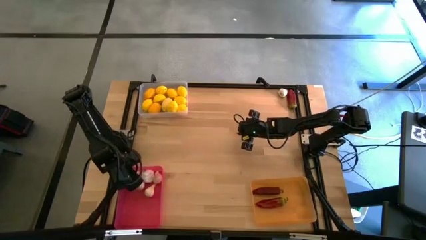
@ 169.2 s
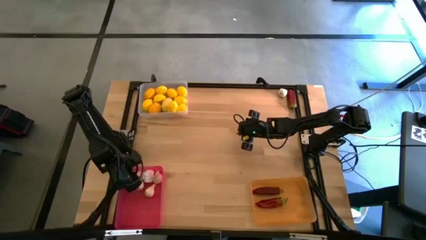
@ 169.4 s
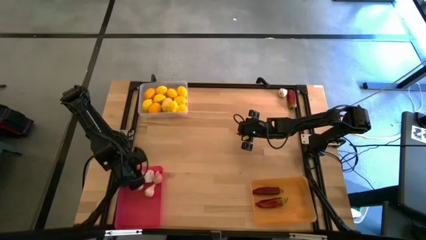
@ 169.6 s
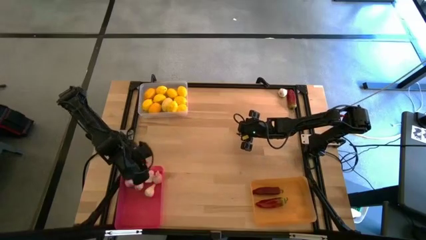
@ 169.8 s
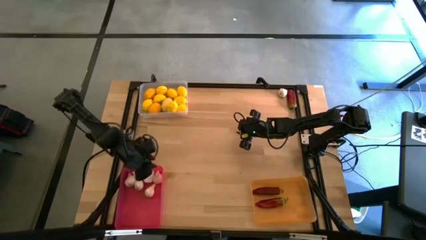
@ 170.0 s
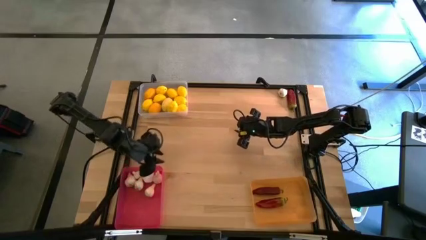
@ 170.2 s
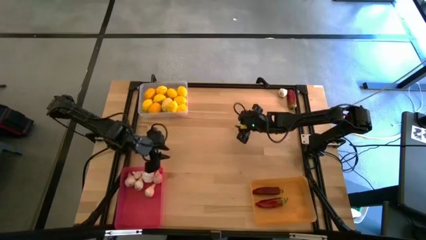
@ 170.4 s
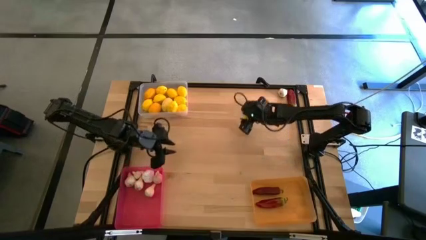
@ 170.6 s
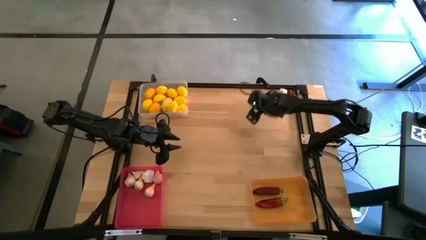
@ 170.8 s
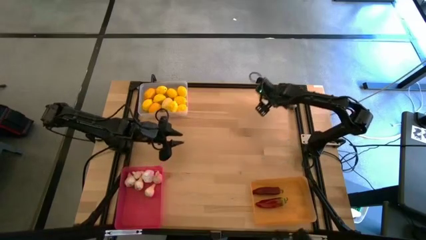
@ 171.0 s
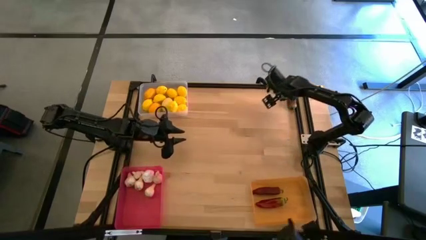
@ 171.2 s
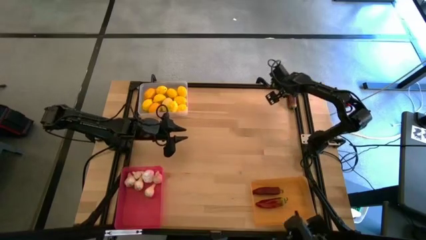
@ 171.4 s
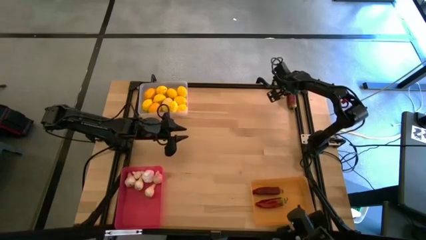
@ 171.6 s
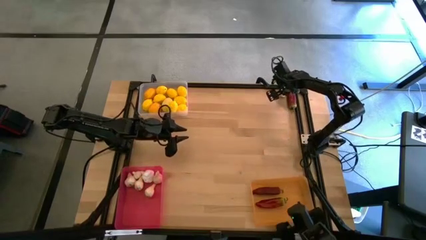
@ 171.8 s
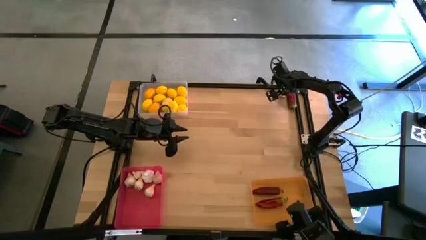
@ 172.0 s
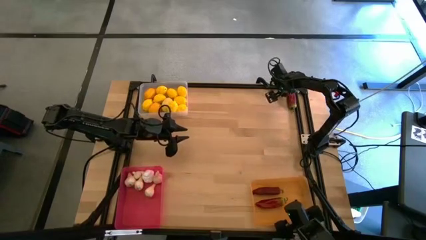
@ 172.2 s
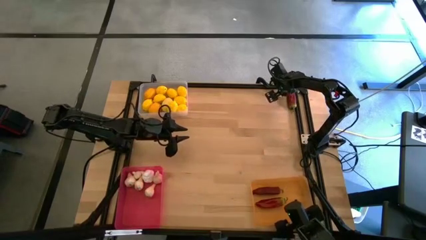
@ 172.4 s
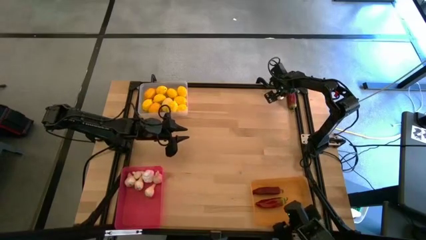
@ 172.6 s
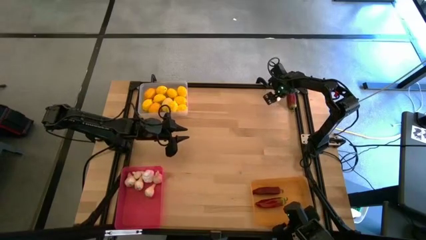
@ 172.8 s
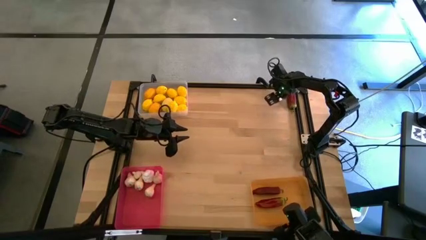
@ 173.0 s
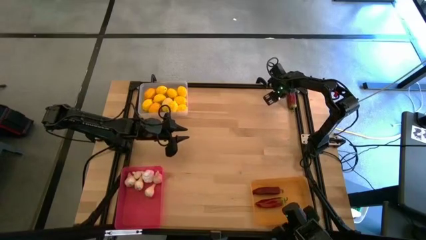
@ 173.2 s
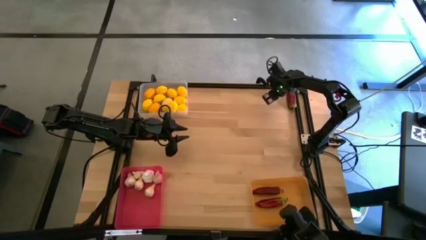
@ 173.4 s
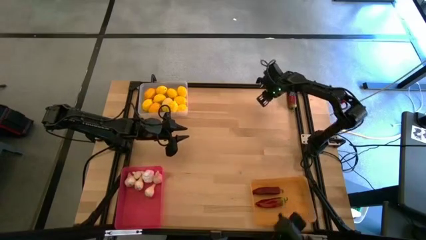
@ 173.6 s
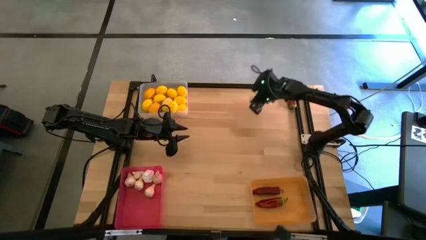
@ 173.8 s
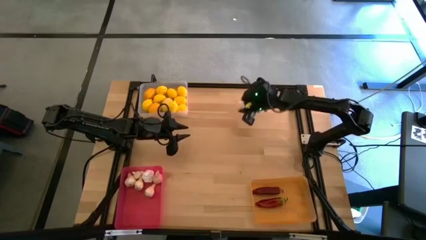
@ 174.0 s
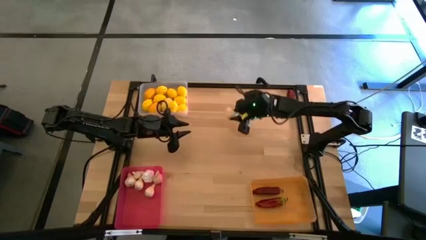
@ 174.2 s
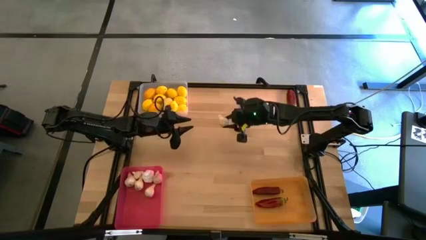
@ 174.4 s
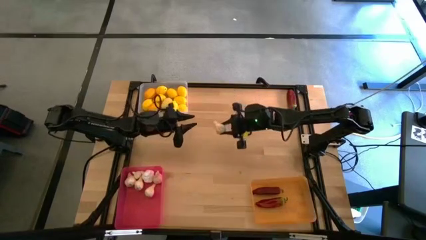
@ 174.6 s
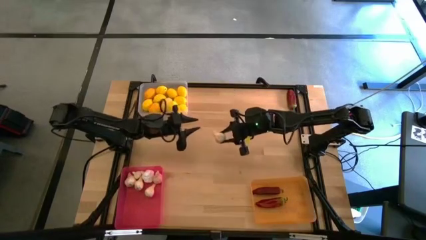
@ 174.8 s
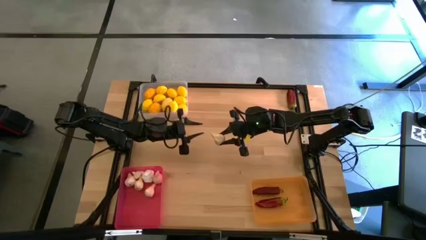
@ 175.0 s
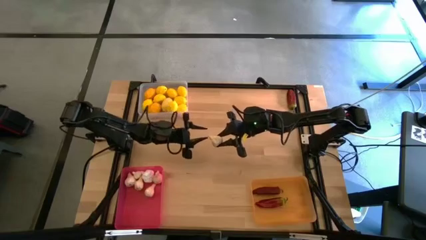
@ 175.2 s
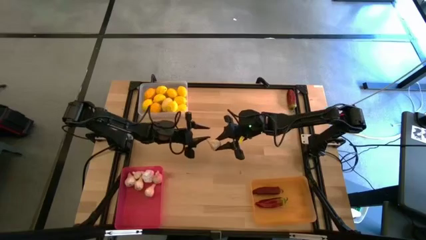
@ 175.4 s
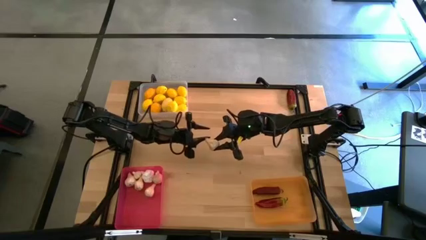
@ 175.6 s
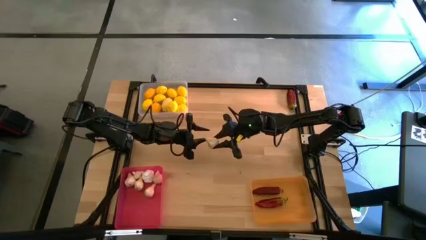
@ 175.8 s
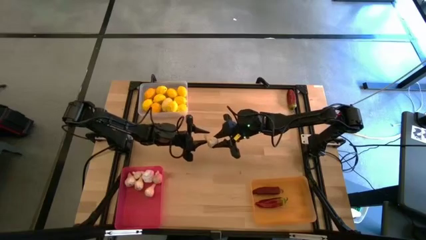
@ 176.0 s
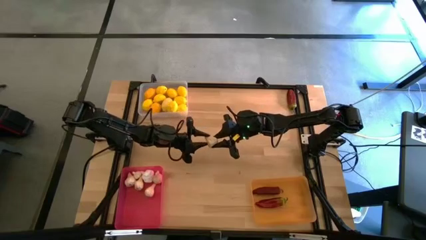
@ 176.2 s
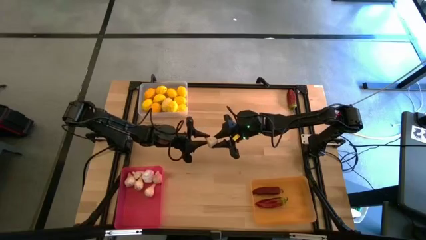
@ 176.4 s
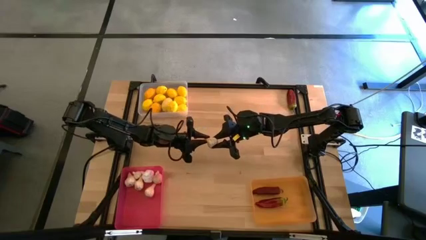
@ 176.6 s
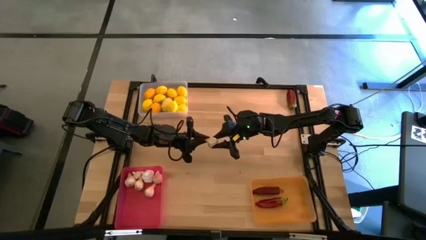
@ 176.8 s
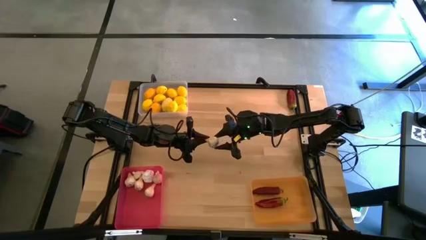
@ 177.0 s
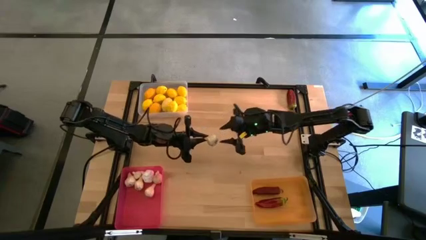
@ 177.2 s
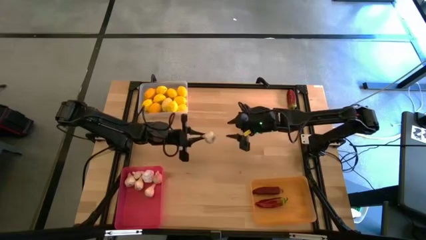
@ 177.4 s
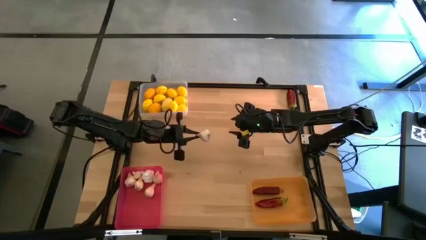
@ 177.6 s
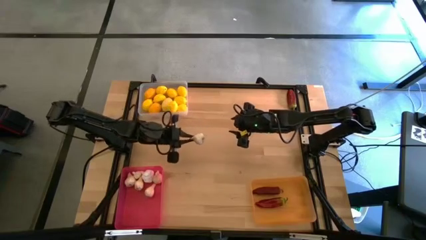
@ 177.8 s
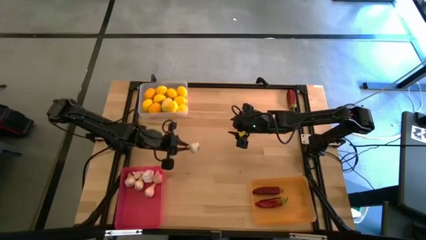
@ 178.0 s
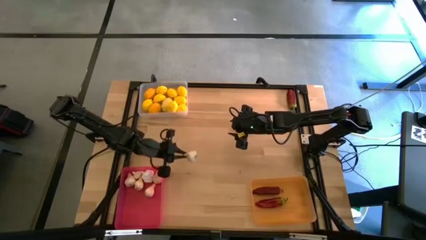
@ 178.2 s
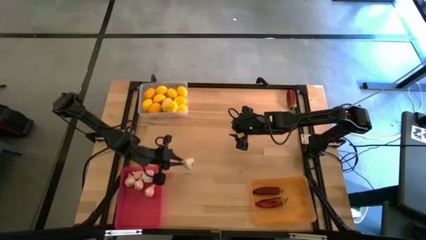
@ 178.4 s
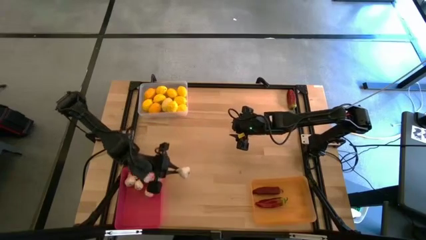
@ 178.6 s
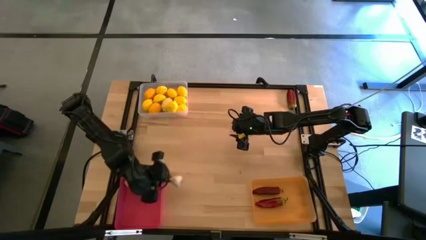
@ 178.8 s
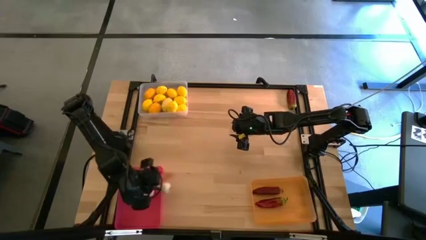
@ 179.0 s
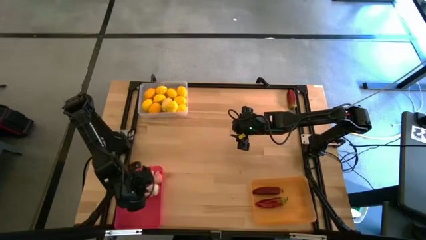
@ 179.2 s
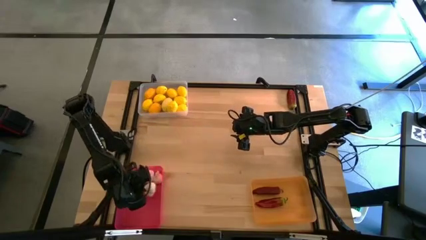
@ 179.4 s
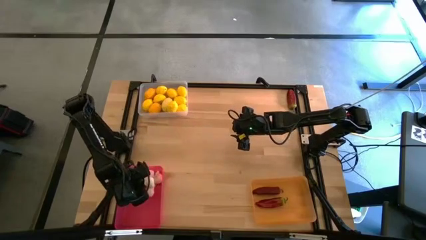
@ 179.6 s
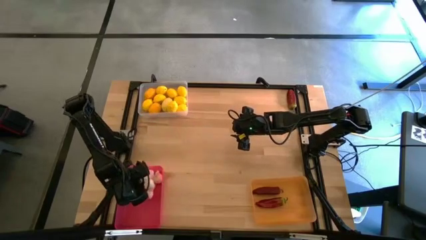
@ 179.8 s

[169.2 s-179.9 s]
Task: Sort produce into baskets
Put the white garlic into the red bin

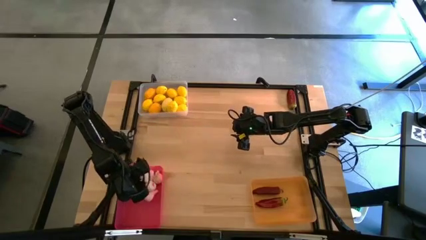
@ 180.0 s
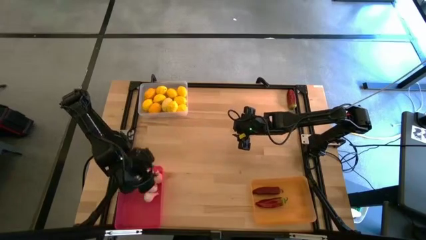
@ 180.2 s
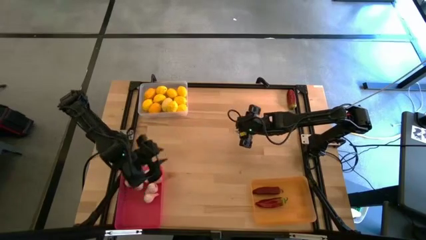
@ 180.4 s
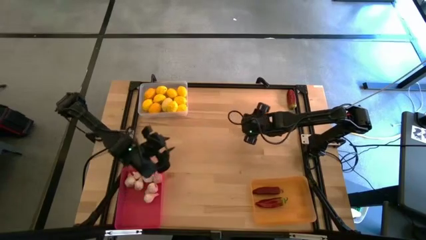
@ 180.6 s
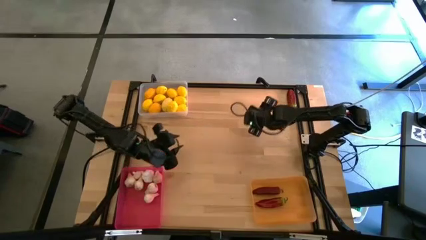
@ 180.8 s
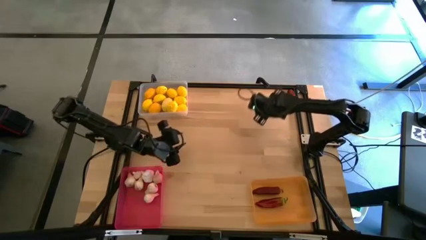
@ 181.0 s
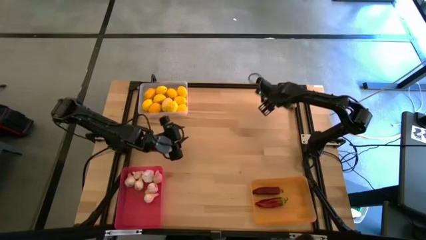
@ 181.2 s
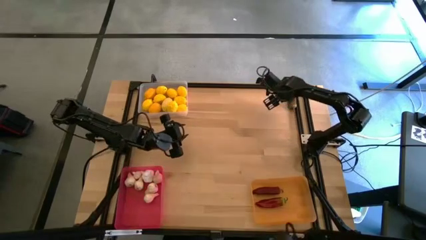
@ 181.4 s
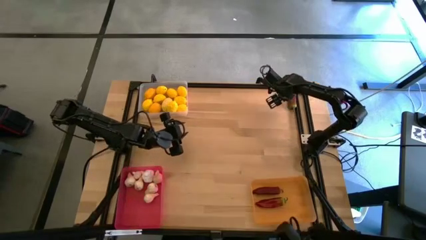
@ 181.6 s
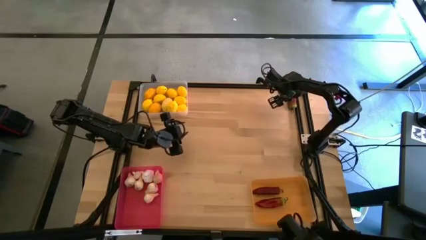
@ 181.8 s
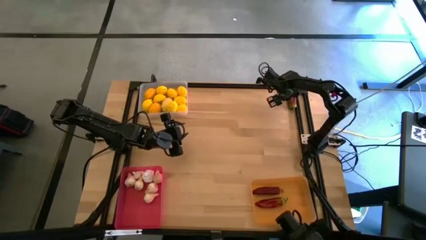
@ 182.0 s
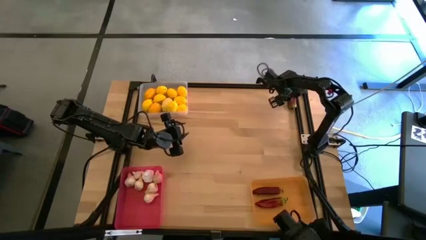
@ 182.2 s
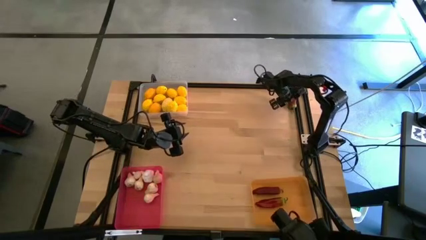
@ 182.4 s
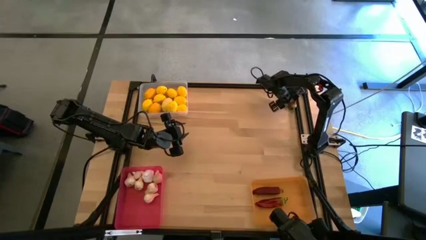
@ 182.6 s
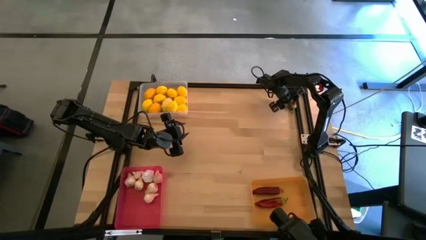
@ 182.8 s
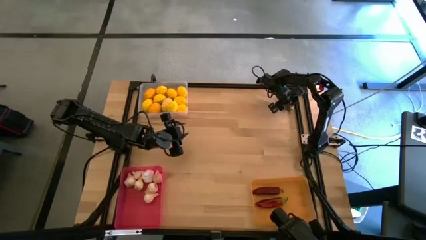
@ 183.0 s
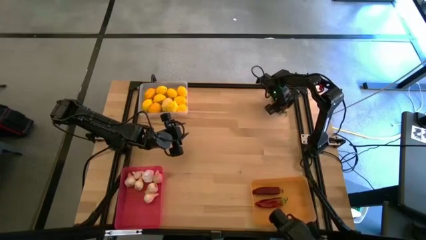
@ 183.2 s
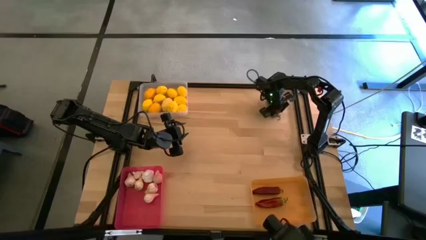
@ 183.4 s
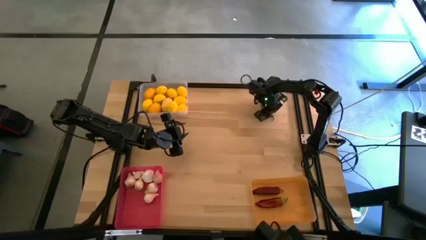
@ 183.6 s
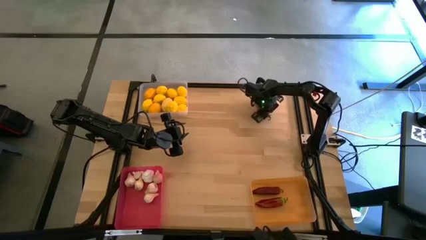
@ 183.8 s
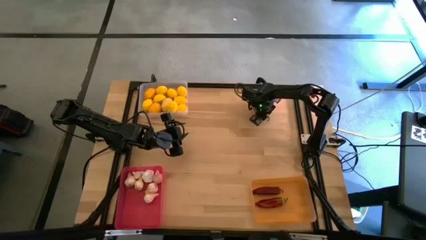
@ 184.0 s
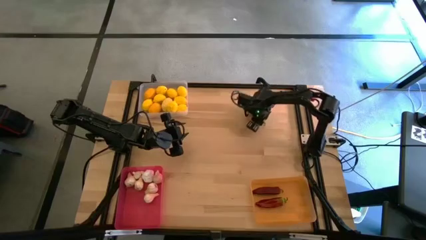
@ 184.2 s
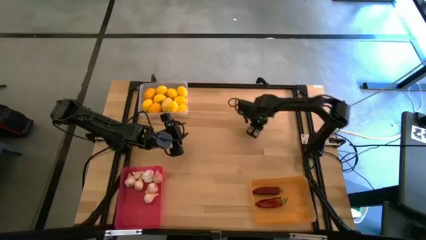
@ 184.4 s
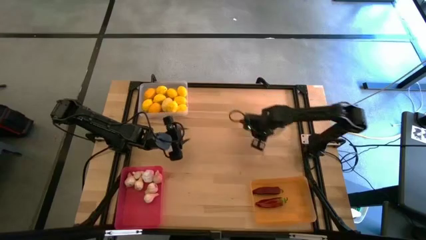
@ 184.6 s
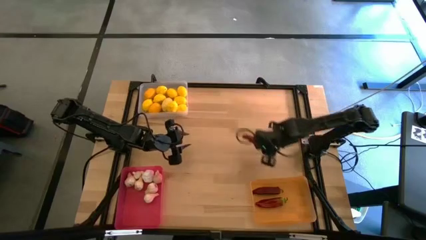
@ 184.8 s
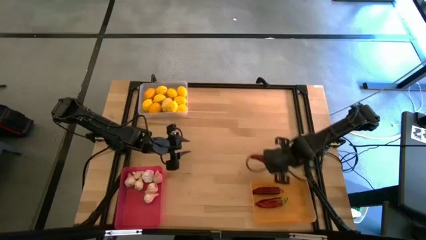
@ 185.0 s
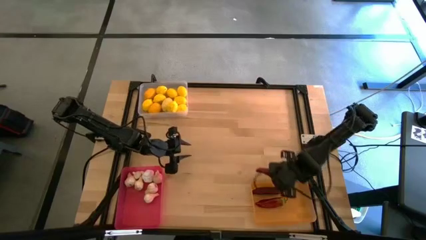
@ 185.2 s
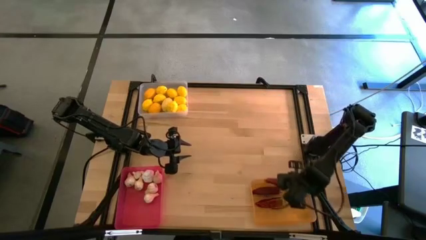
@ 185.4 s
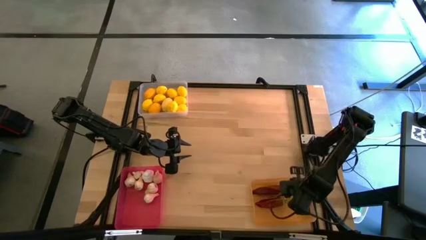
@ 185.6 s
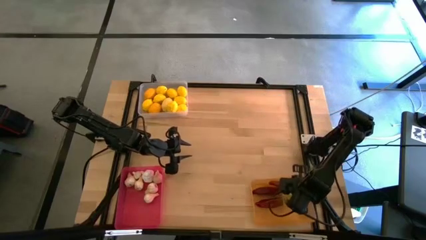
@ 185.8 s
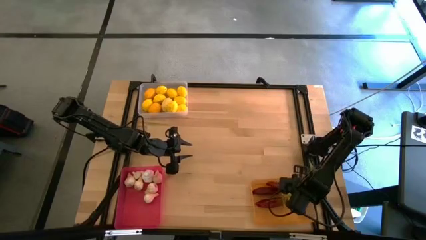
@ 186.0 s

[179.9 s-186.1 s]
Put the red chili pepper into the orange bin

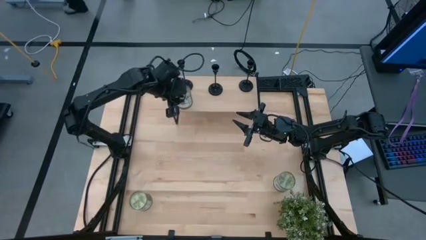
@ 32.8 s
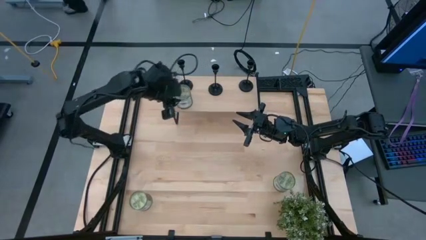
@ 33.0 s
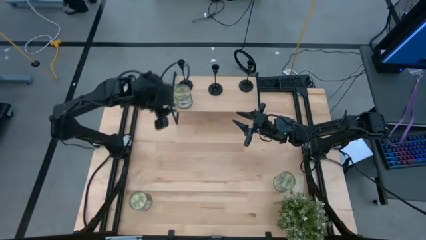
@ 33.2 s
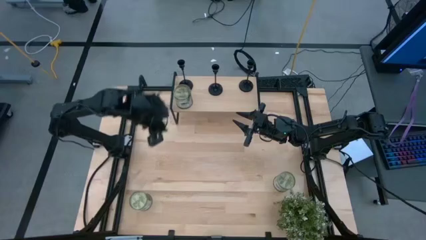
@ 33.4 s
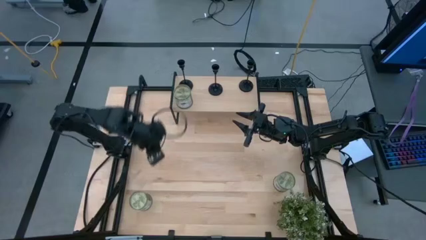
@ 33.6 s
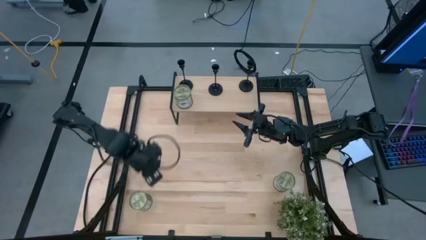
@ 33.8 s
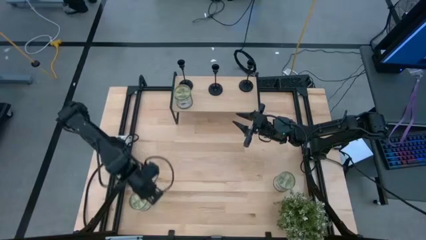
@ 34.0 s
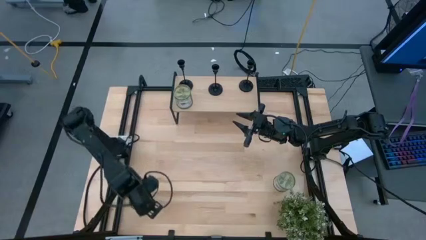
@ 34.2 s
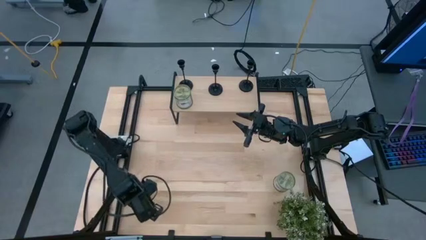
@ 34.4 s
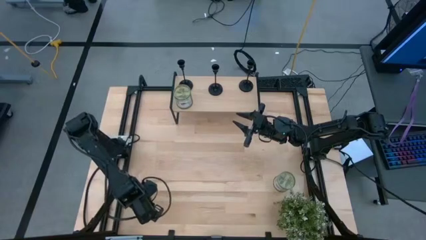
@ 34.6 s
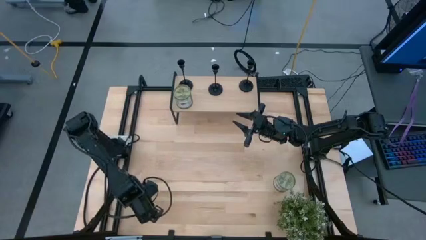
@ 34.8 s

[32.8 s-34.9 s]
Task: Pick & Place candle stick holders
Put the left green scented candle on the shelf
